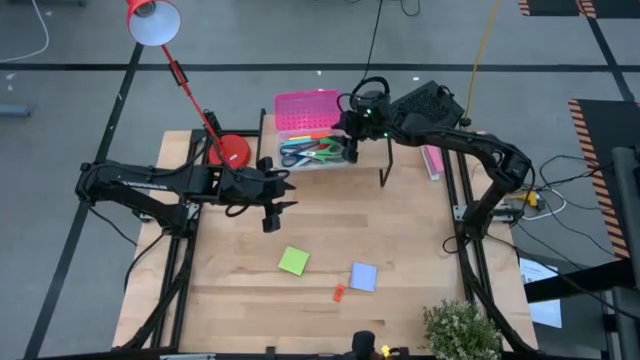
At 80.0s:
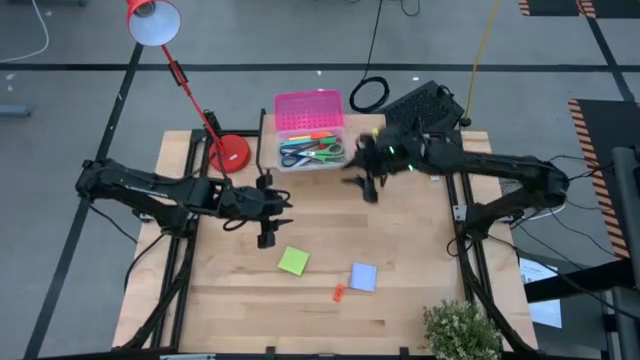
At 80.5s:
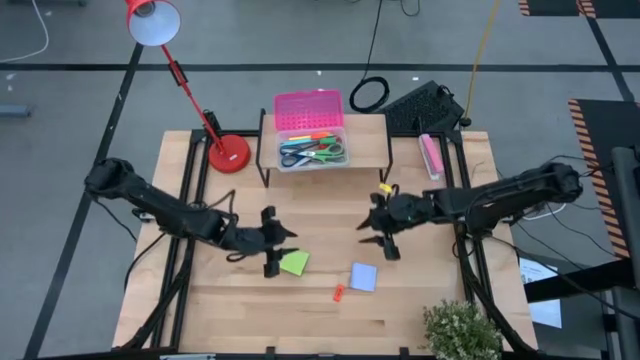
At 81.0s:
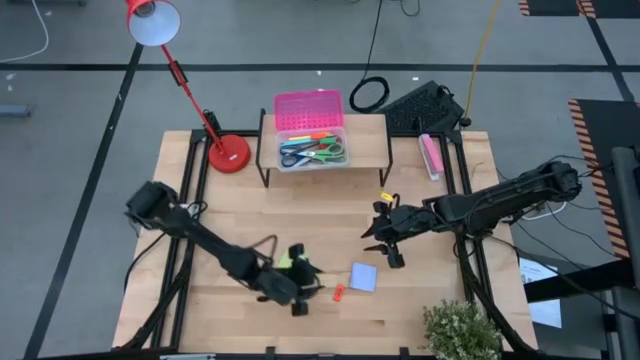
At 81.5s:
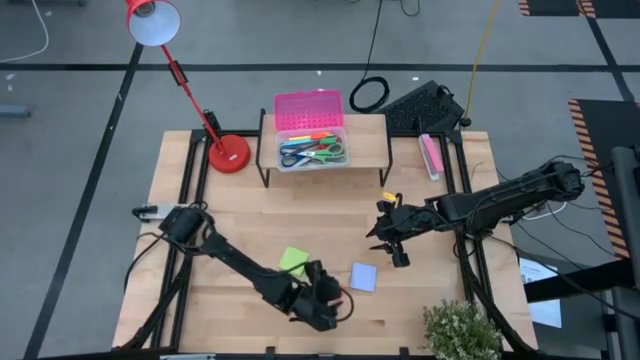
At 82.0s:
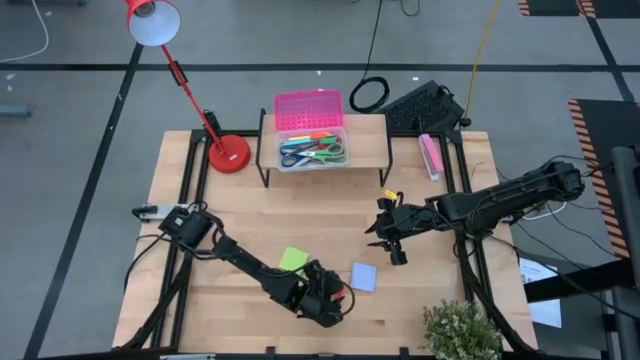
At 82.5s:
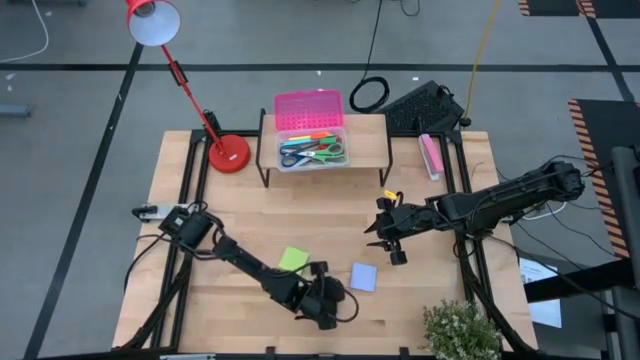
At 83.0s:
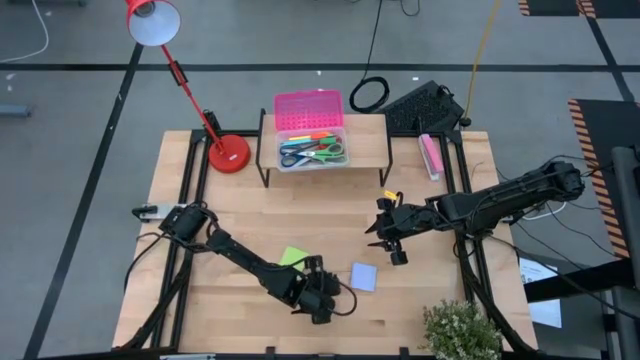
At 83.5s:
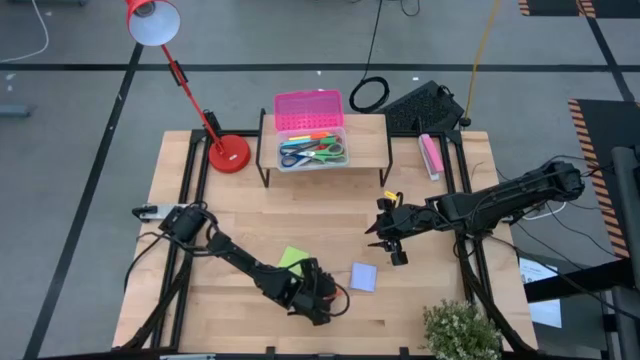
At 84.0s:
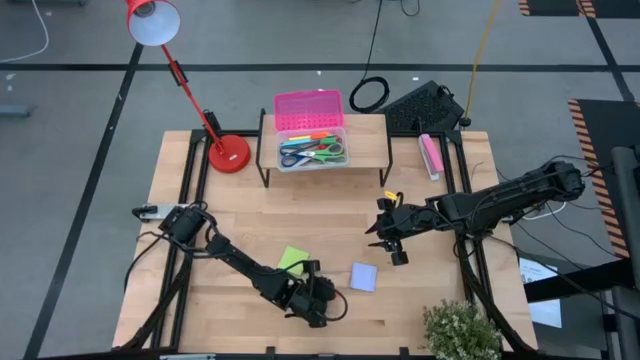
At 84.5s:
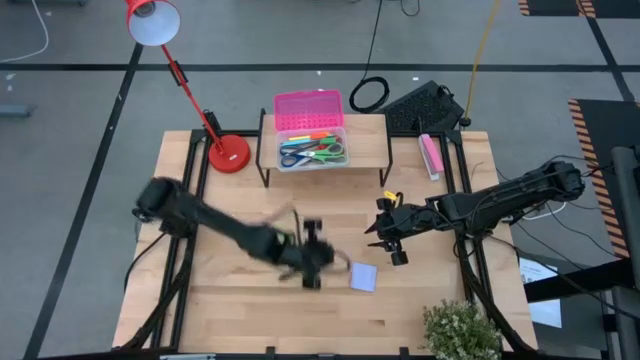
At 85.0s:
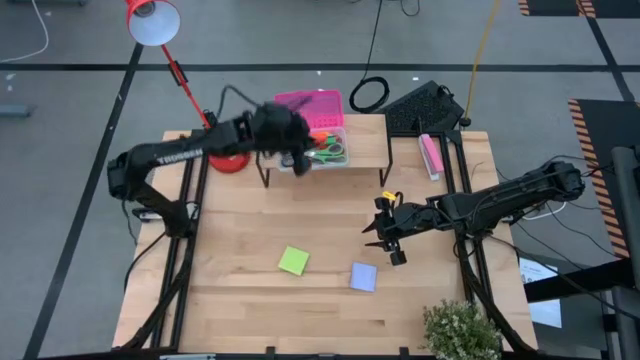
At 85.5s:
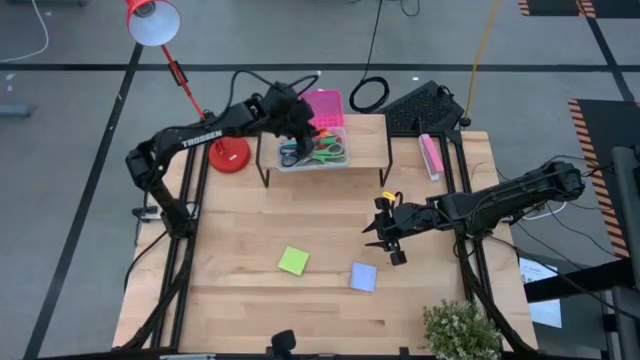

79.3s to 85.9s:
Task: Pack school essentials
Put the orange eraser into the pink supply box on the shelf

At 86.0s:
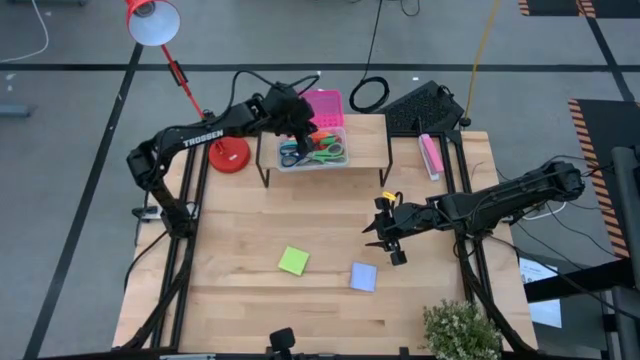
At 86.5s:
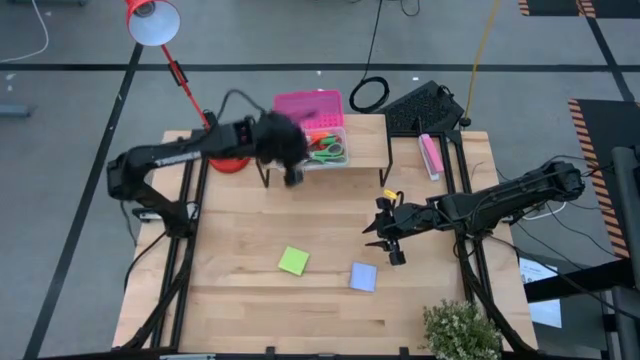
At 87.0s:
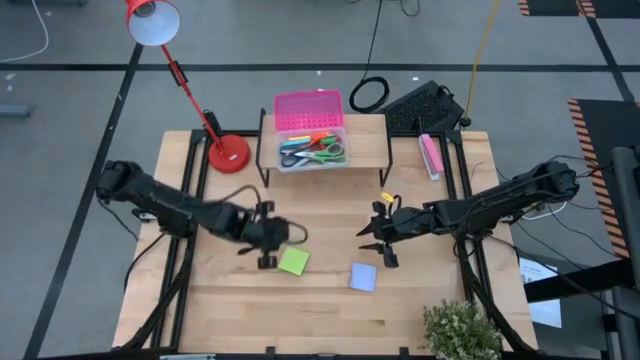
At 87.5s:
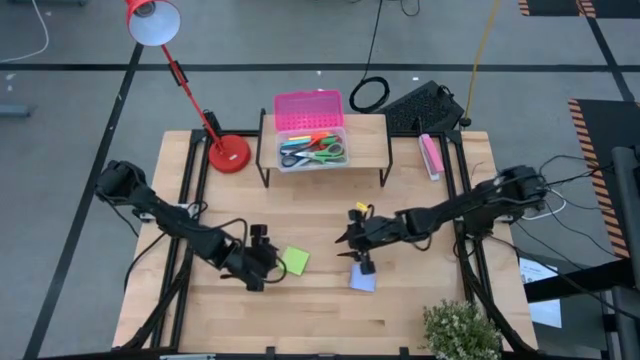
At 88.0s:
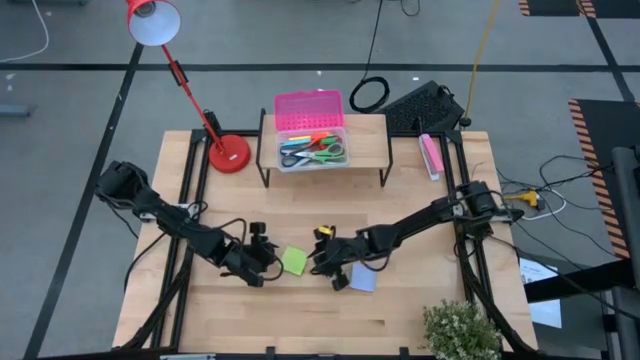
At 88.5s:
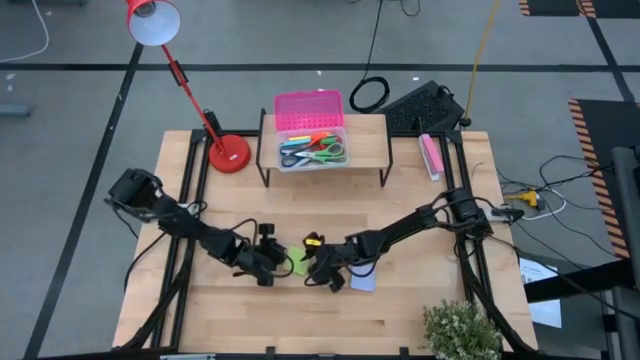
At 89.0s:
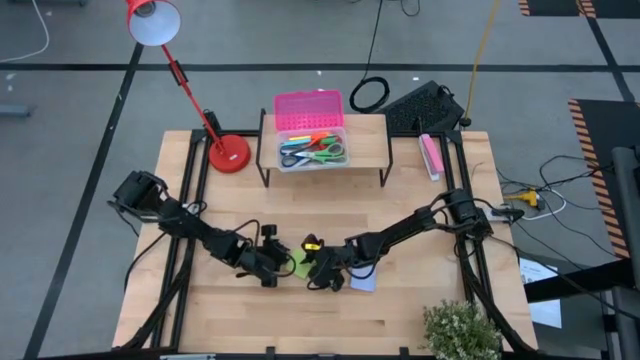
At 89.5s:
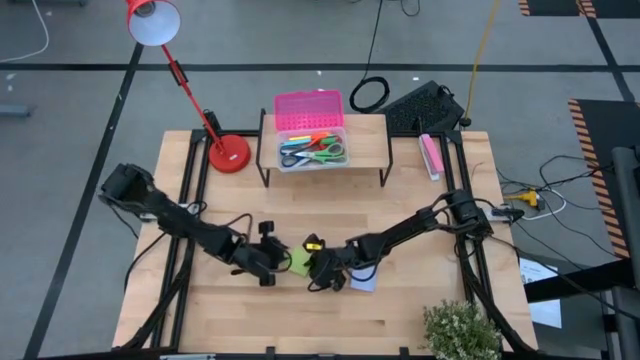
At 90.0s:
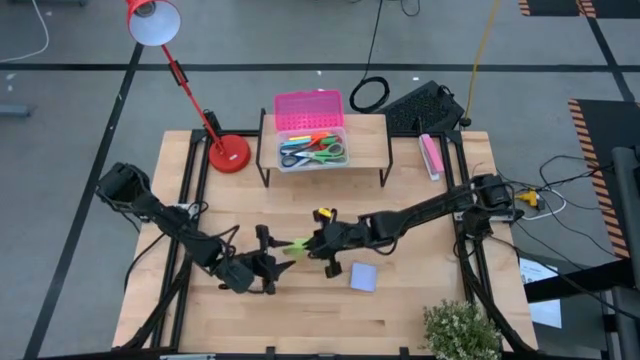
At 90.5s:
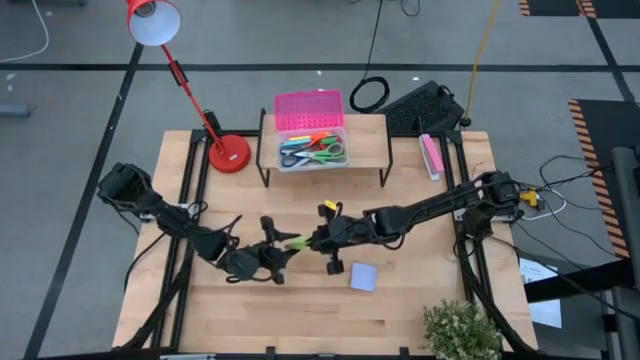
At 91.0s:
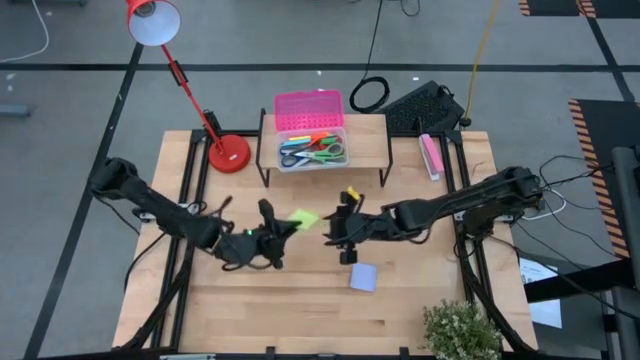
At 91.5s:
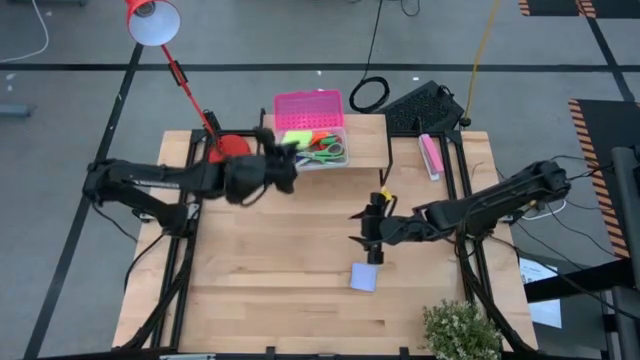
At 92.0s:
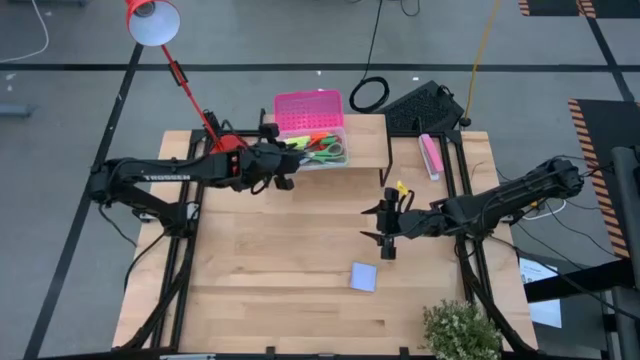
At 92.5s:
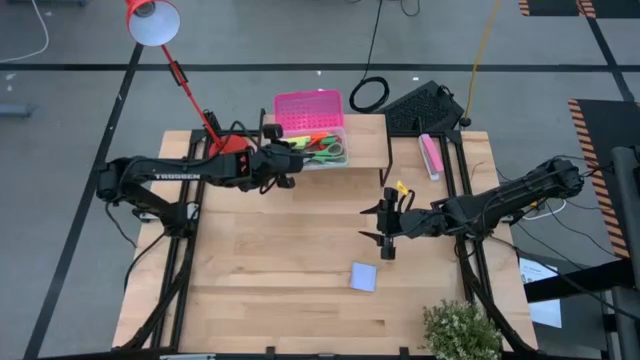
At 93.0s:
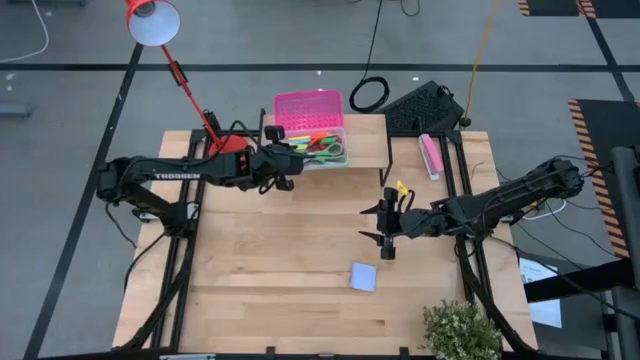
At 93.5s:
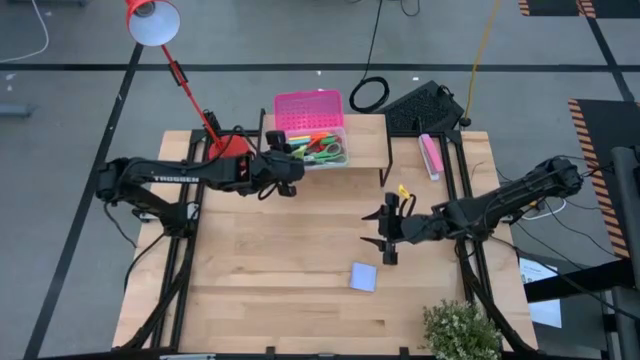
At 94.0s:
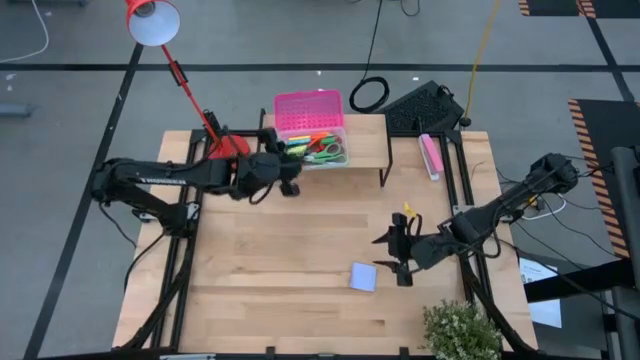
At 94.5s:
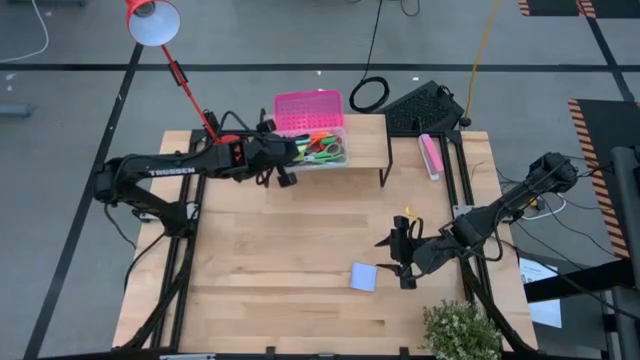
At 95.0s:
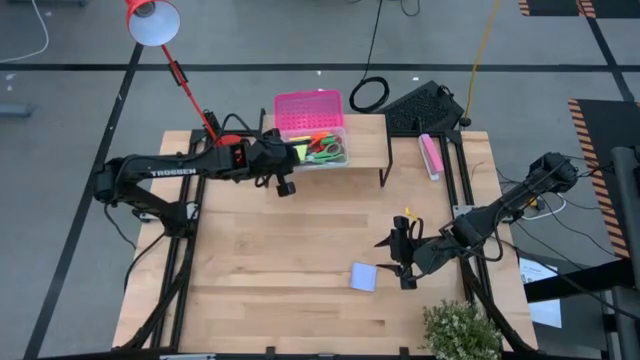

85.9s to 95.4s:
Put the light green sticky notes into the pink supply box on the shelf

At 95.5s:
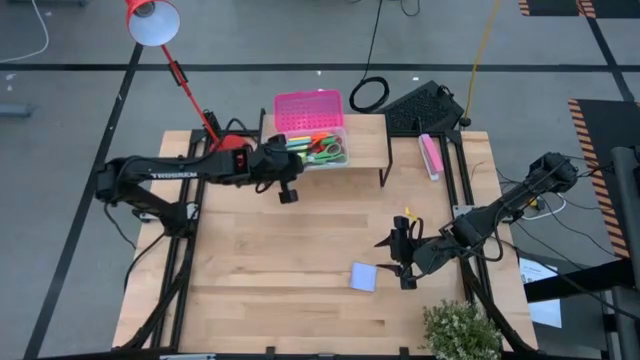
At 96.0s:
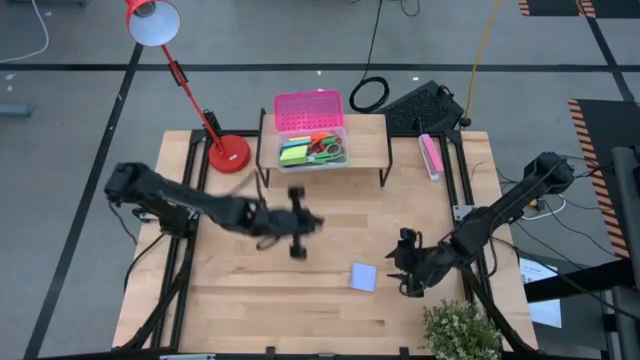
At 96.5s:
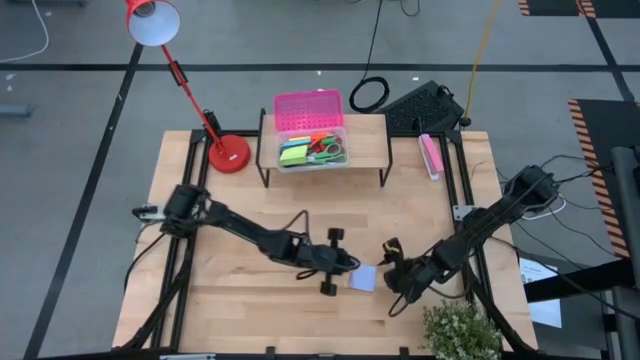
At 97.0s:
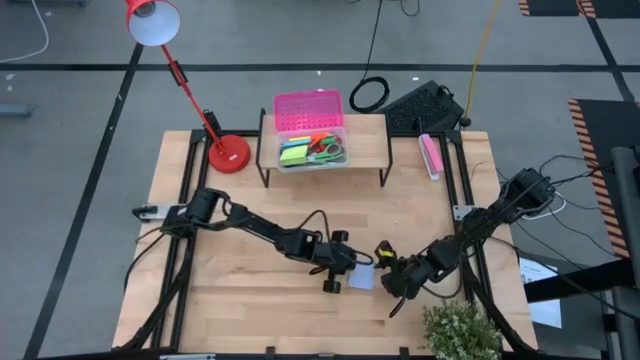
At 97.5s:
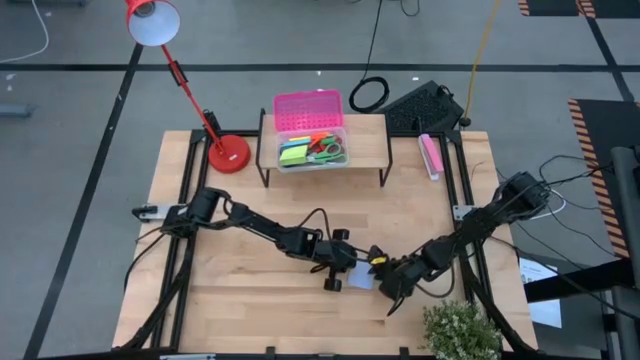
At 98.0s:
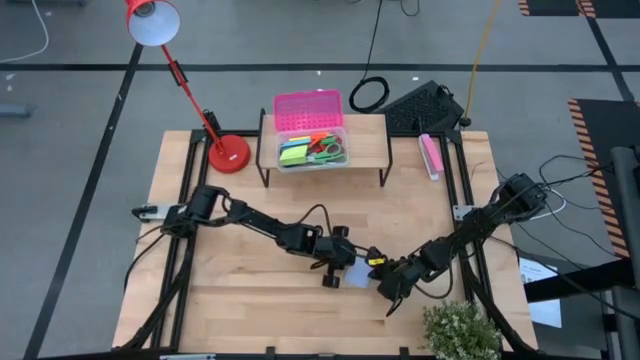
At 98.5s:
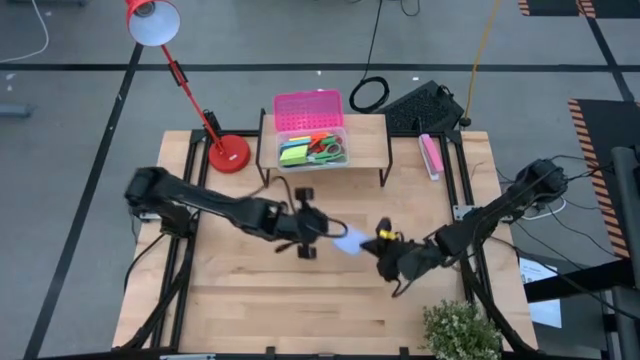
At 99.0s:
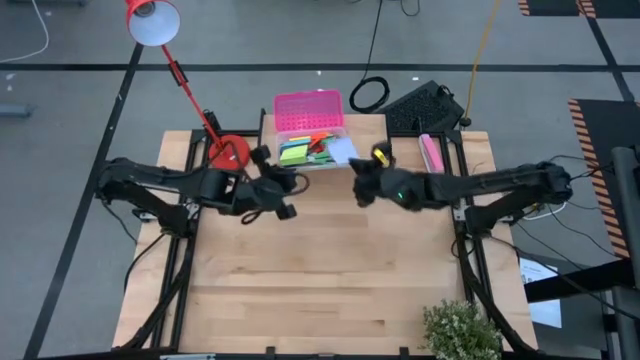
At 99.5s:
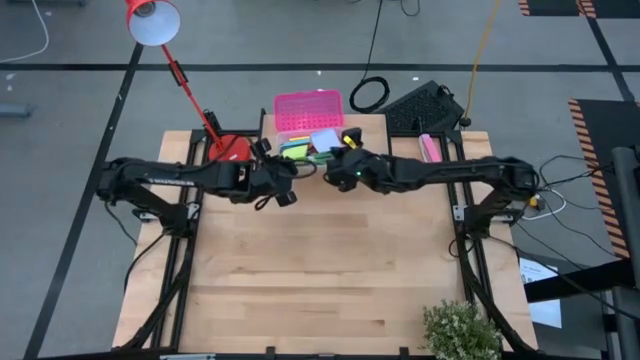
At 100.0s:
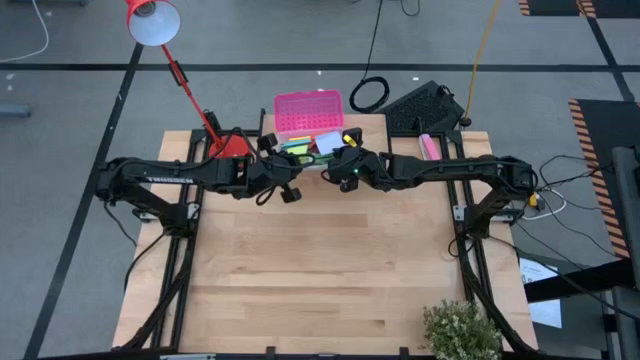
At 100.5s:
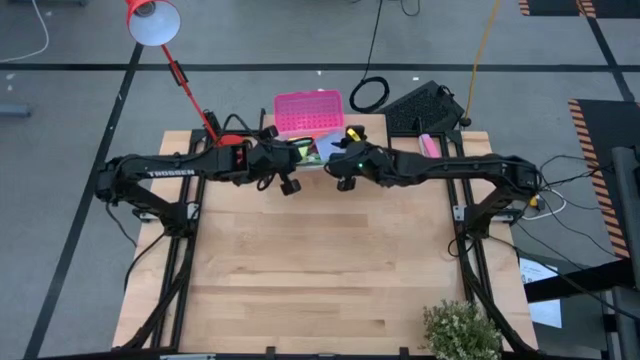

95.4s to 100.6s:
Put the light blue sticky notes into the pink supply box on the shelf

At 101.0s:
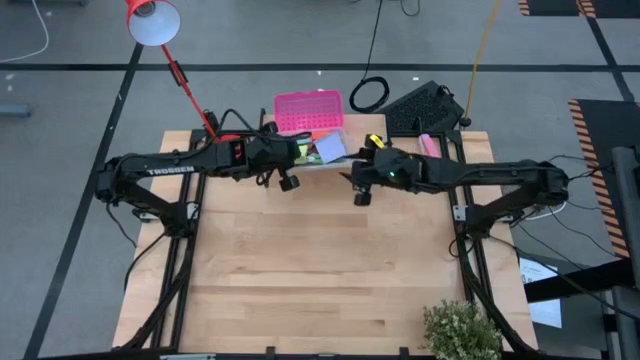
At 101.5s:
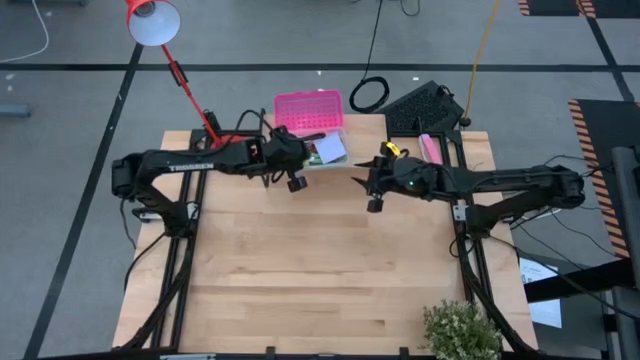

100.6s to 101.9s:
Adjust the light green sticky notes in the pink supply box on the shelf
